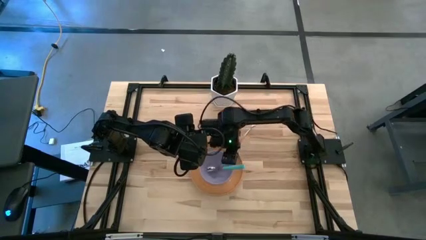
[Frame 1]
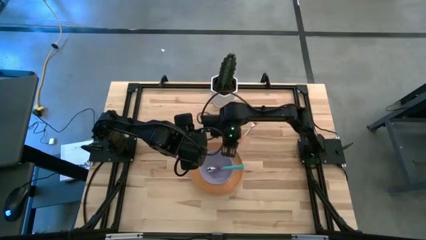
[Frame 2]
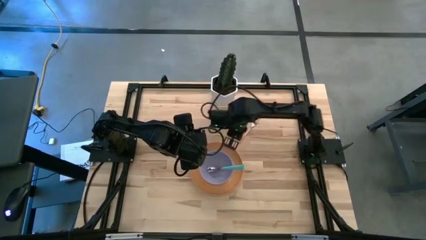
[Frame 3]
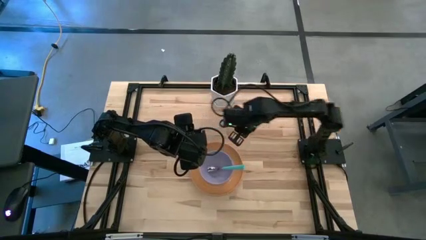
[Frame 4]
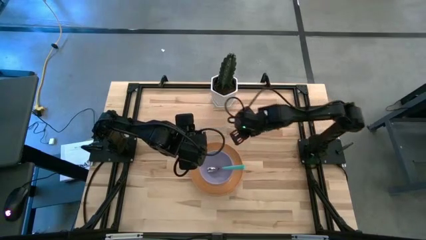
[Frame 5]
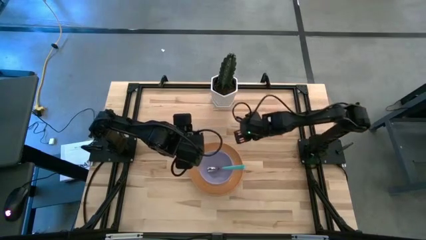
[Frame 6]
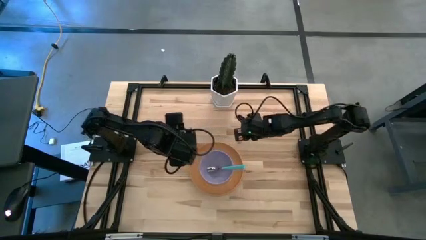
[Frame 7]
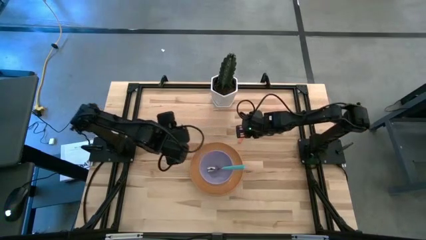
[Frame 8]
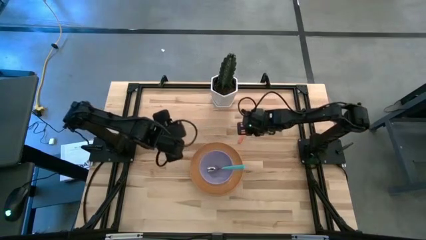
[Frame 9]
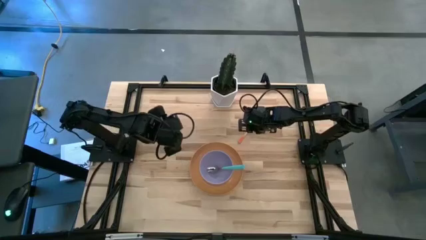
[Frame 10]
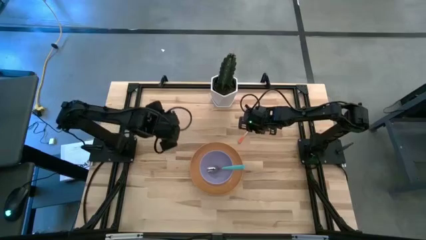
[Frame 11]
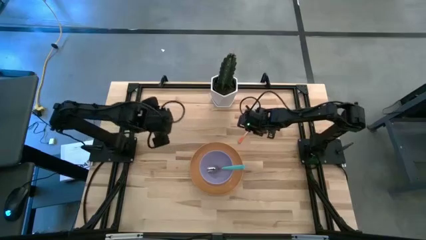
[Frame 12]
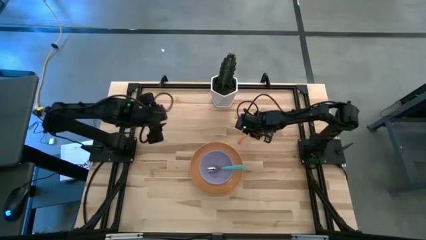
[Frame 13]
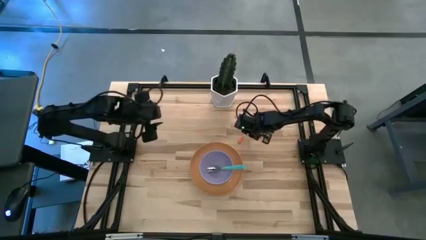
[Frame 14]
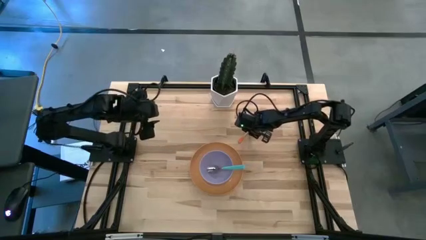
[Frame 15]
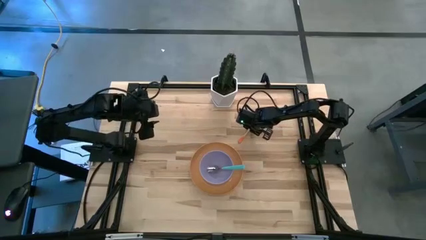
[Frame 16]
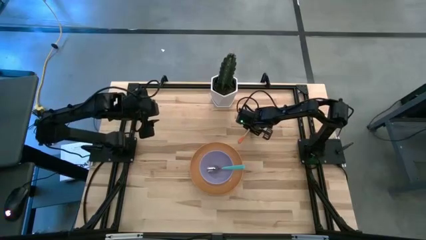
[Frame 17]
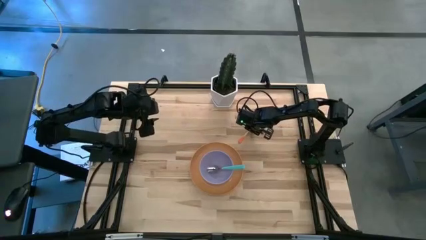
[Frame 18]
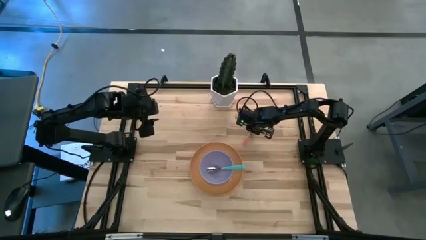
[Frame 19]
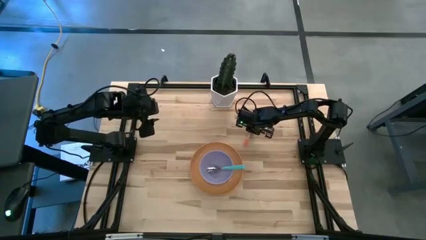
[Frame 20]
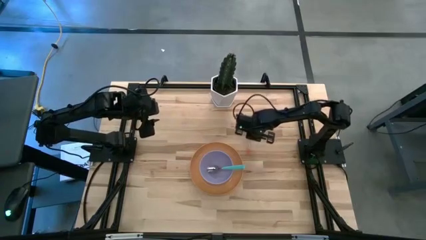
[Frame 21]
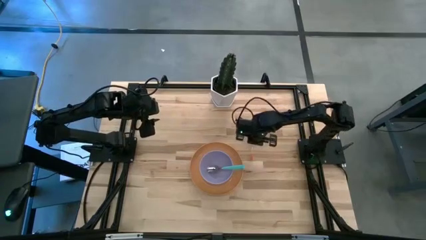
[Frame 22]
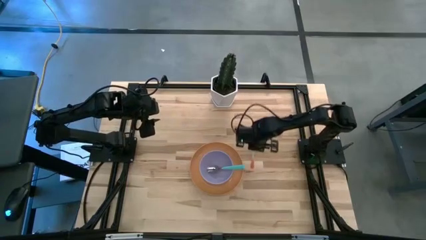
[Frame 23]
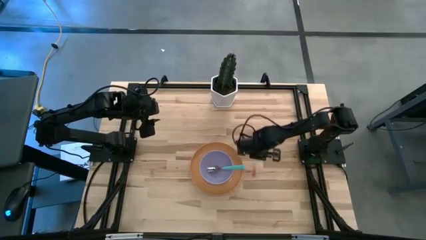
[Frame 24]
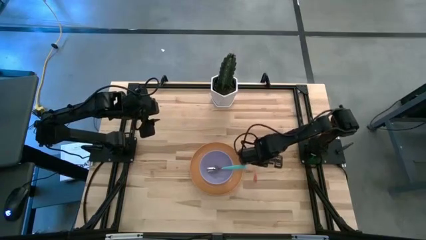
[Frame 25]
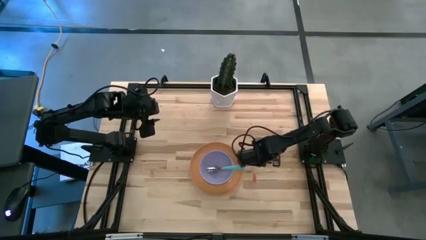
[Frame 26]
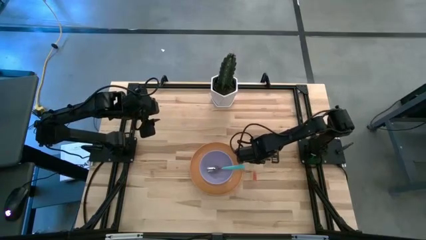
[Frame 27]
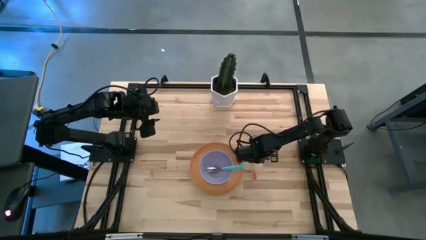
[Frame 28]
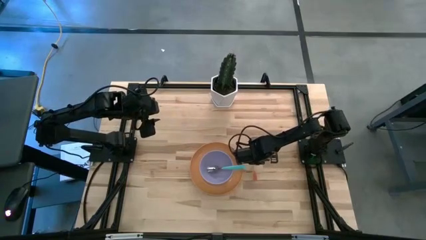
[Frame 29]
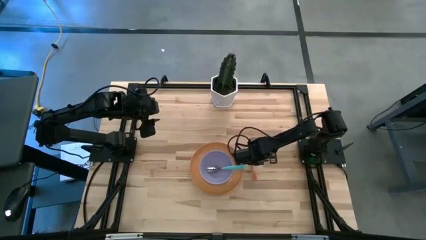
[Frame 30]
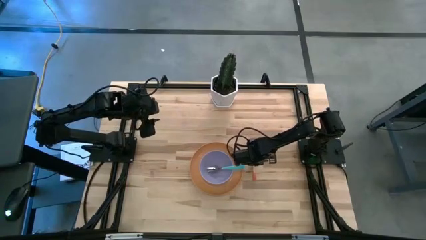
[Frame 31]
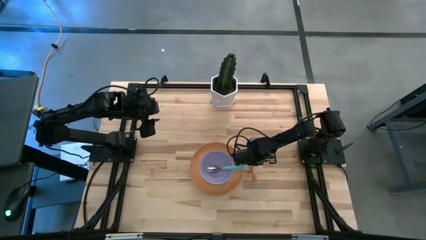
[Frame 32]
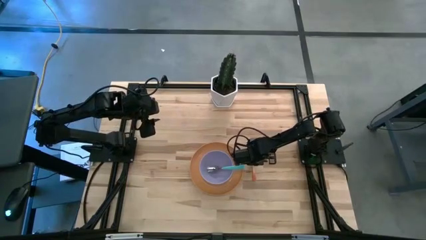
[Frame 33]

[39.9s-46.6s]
Task: Set table place
Put the orange fork beside the plate

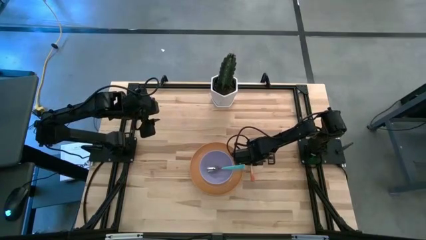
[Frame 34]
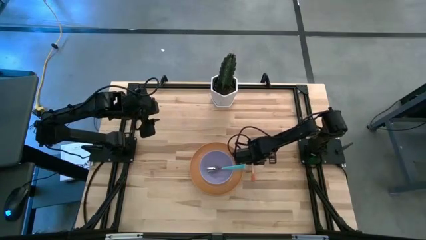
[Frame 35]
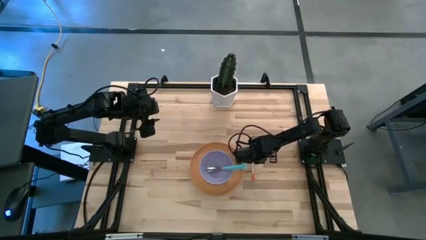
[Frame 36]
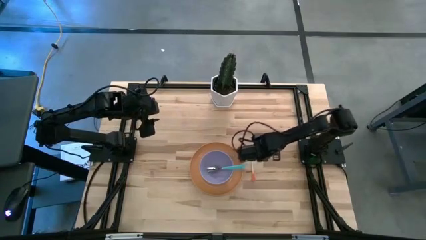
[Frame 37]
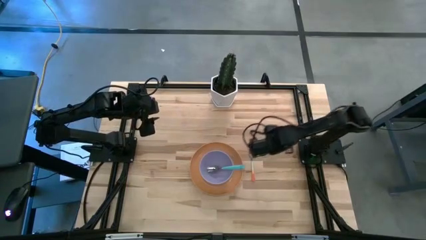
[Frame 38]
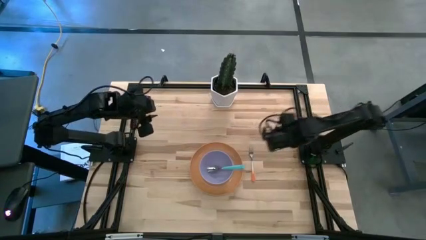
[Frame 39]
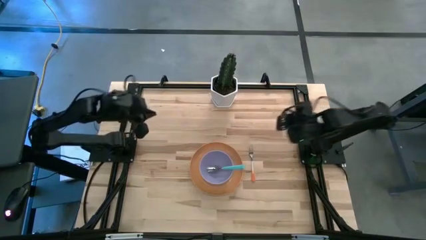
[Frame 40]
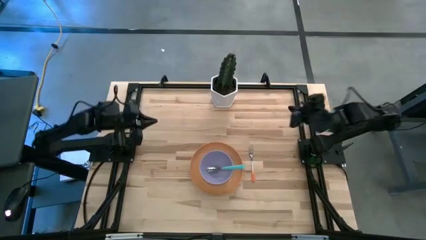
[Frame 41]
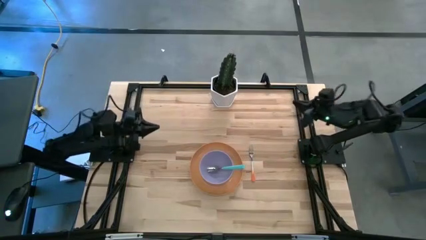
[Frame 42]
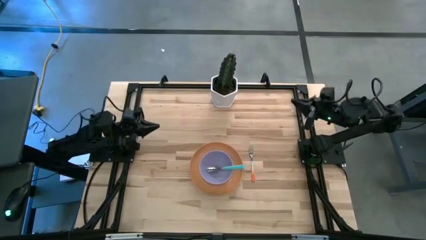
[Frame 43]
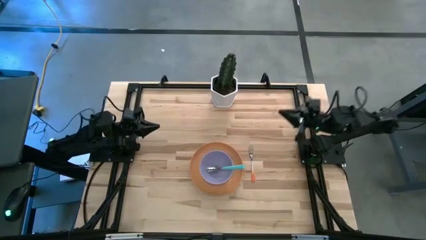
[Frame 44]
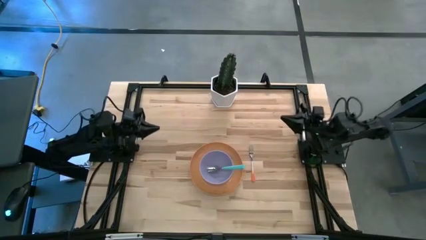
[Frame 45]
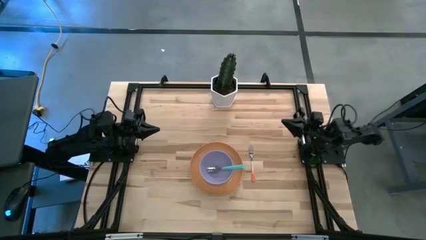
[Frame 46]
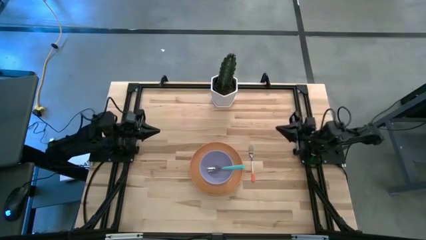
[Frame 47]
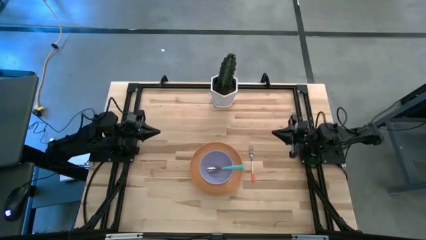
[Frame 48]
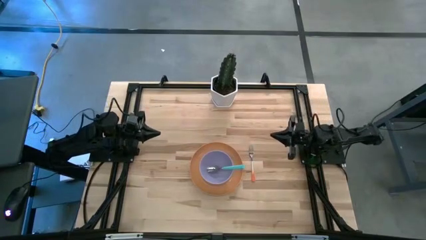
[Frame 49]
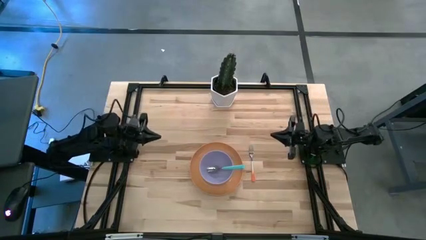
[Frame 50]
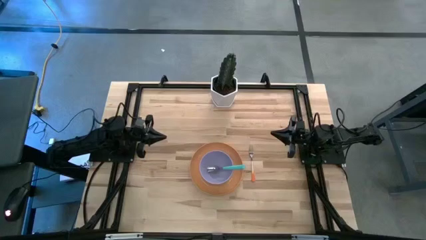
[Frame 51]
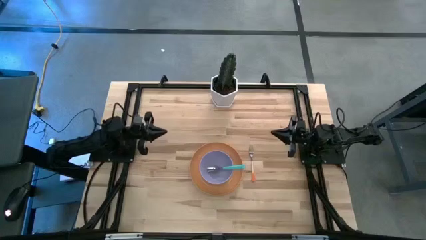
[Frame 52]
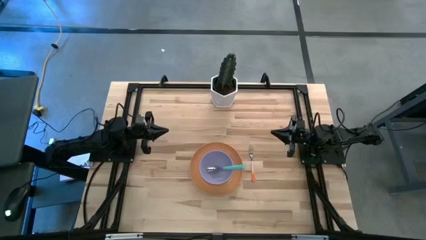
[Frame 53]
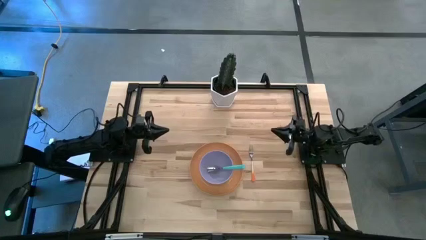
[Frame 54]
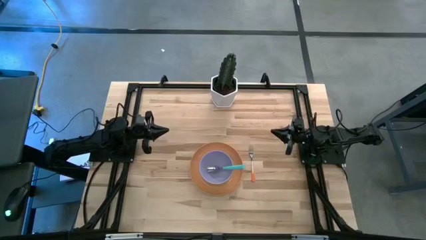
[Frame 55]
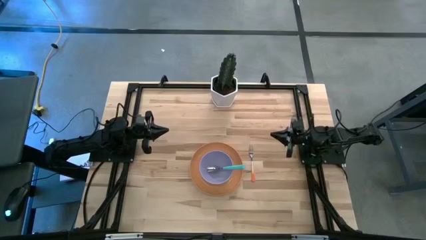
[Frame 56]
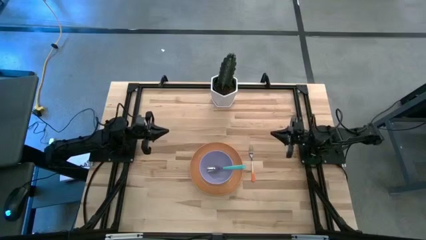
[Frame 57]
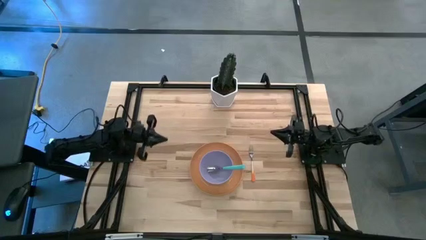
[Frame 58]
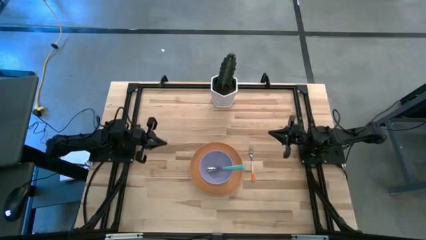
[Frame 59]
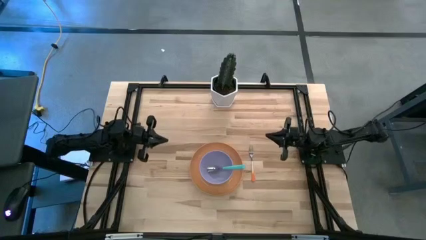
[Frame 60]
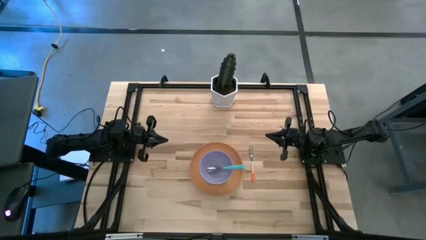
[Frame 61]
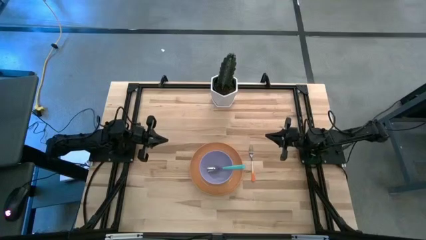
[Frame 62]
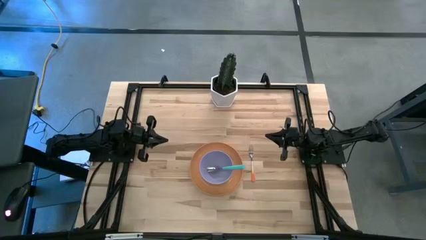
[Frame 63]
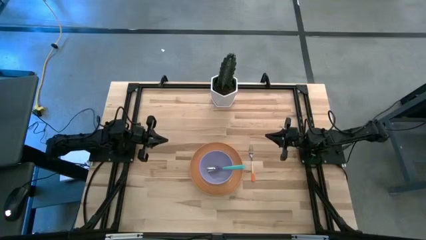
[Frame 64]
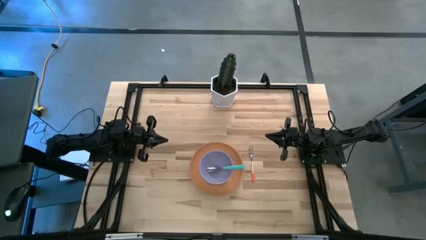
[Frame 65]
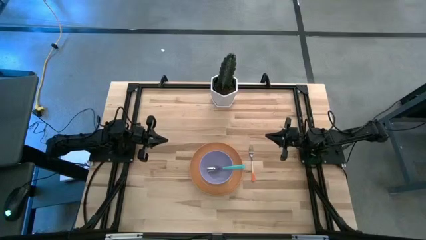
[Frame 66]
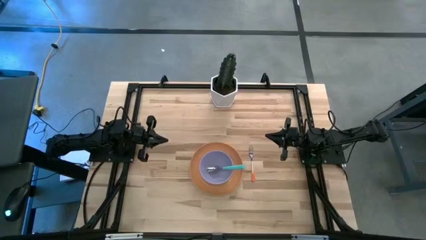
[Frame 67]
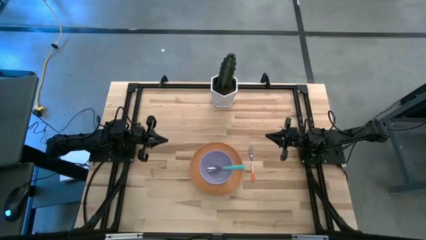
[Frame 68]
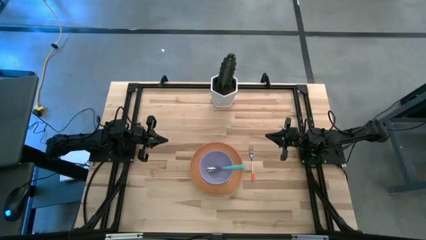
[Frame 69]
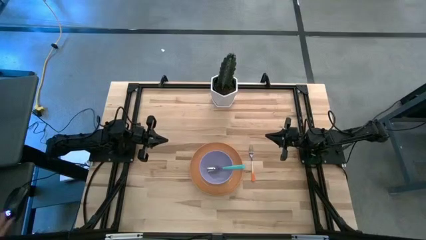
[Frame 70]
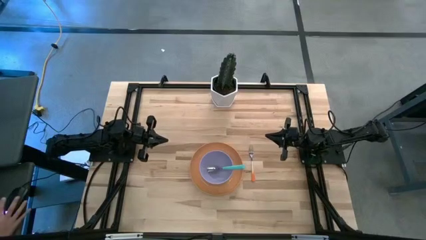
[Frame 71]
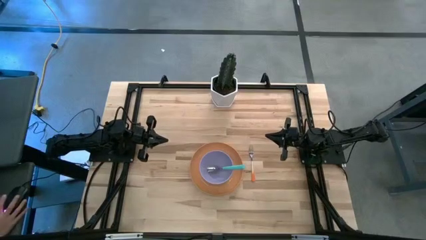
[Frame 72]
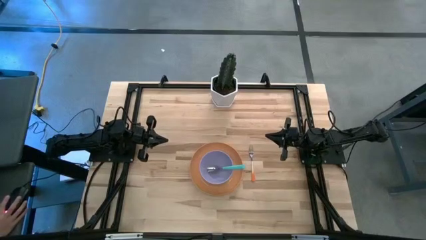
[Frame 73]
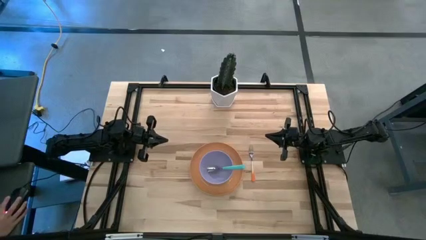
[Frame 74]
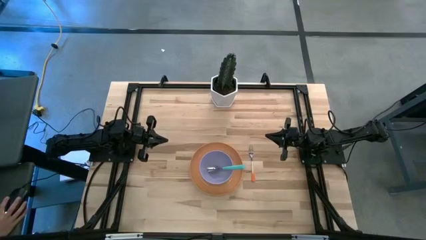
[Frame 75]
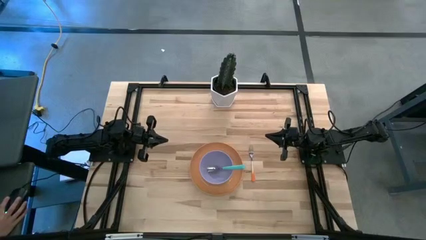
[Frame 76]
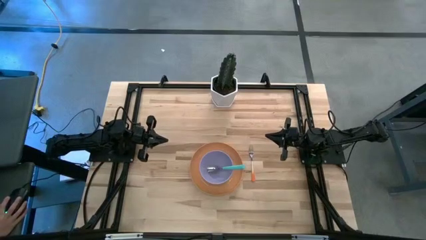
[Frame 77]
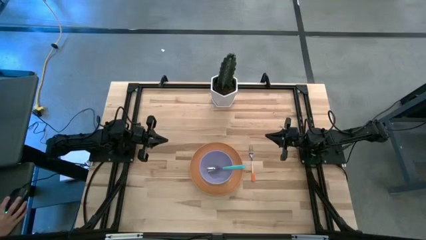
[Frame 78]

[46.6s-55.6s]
Return to Home Position
